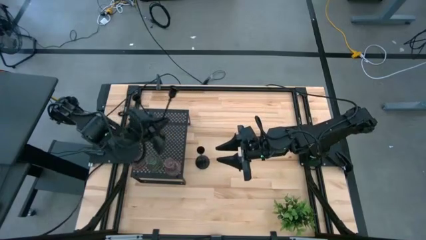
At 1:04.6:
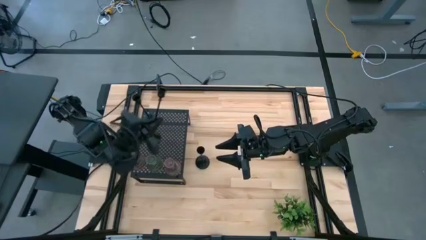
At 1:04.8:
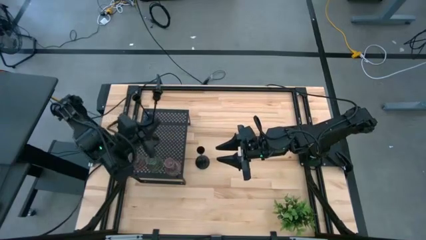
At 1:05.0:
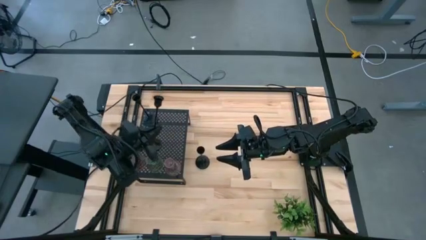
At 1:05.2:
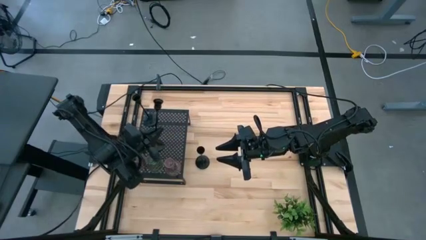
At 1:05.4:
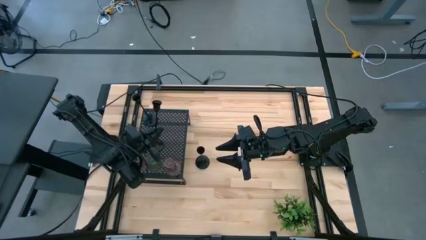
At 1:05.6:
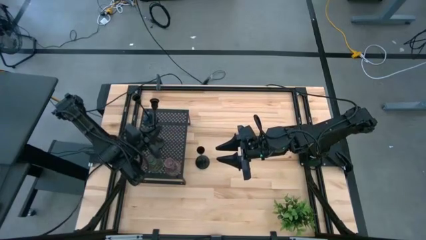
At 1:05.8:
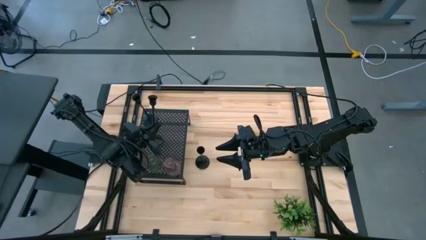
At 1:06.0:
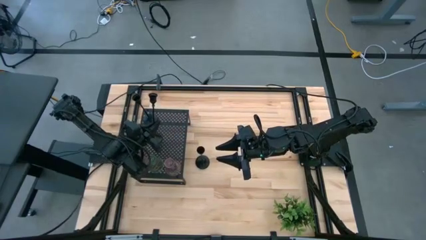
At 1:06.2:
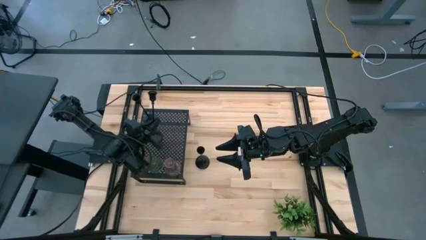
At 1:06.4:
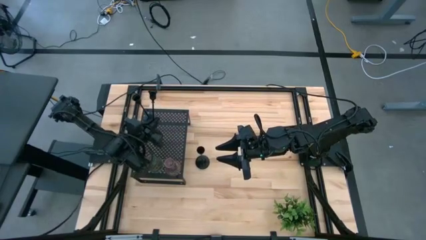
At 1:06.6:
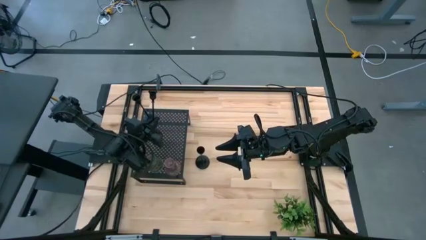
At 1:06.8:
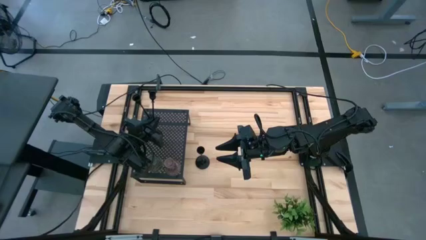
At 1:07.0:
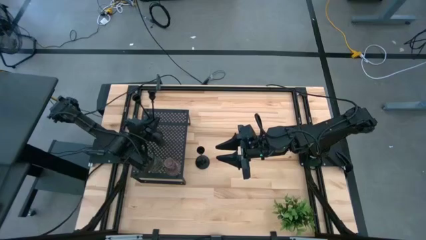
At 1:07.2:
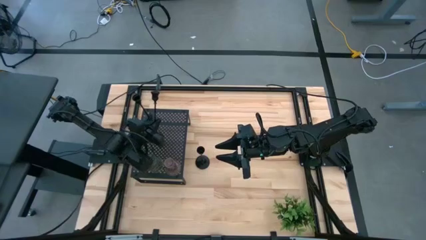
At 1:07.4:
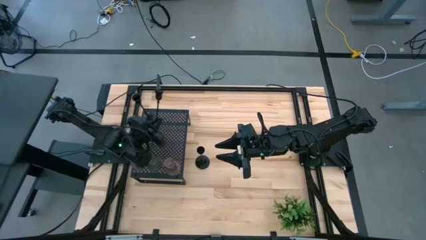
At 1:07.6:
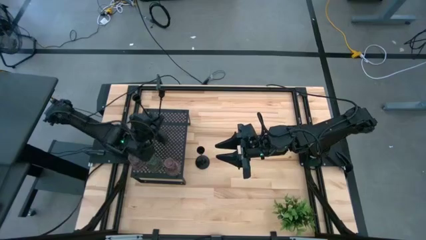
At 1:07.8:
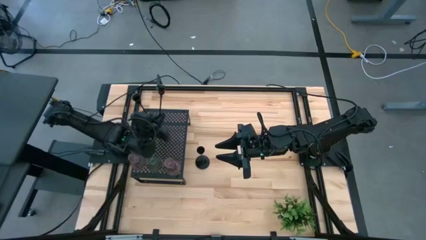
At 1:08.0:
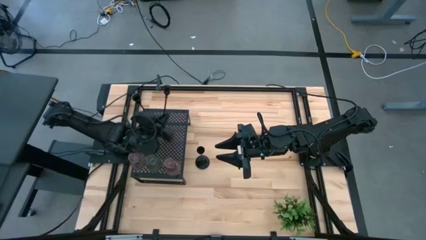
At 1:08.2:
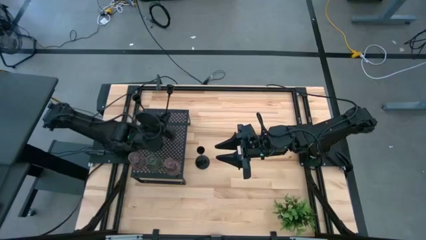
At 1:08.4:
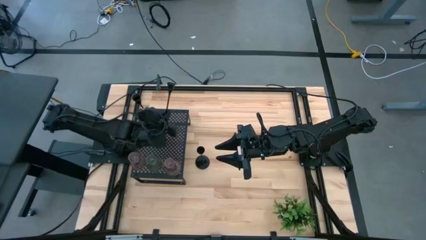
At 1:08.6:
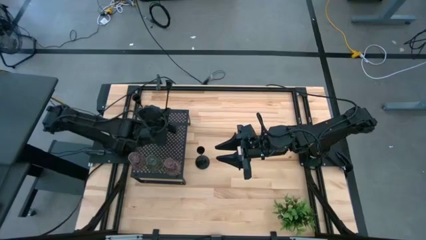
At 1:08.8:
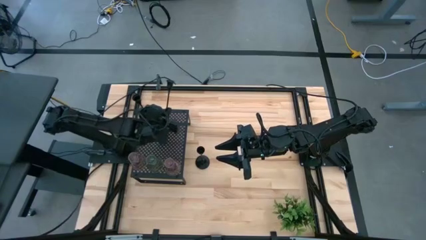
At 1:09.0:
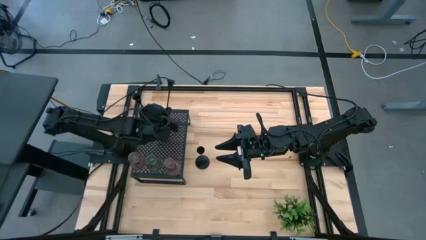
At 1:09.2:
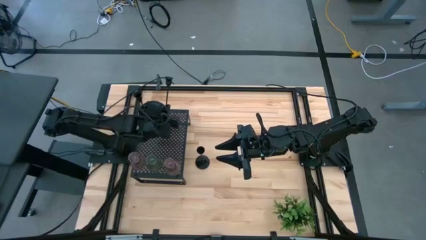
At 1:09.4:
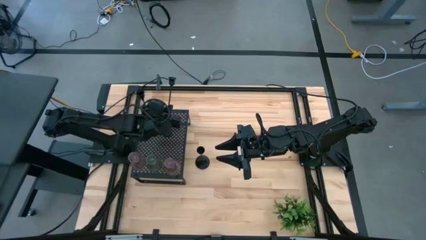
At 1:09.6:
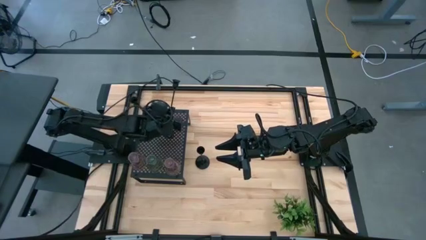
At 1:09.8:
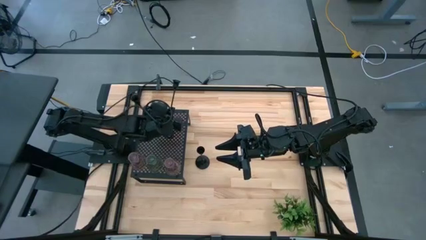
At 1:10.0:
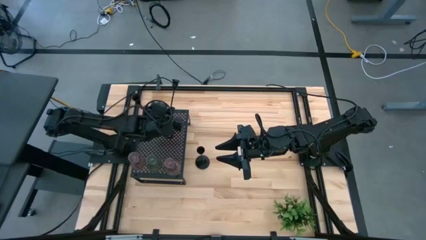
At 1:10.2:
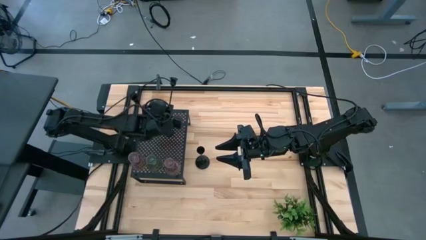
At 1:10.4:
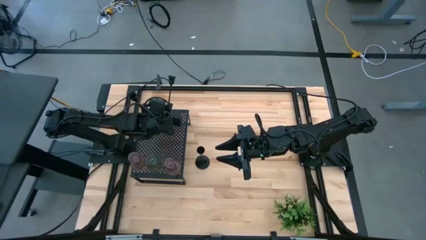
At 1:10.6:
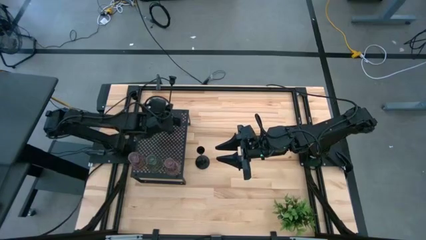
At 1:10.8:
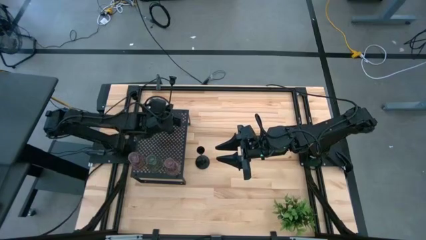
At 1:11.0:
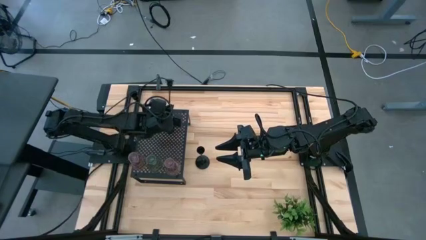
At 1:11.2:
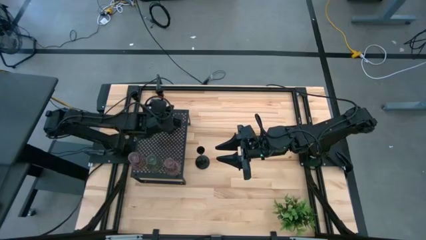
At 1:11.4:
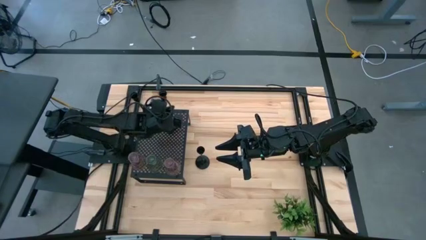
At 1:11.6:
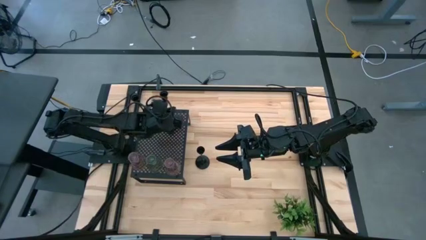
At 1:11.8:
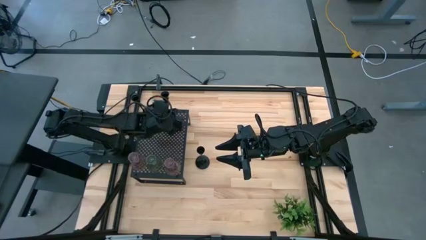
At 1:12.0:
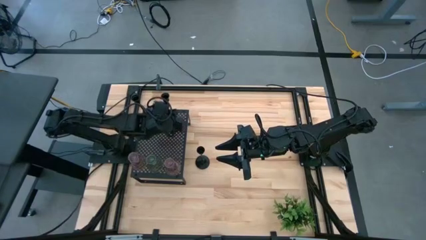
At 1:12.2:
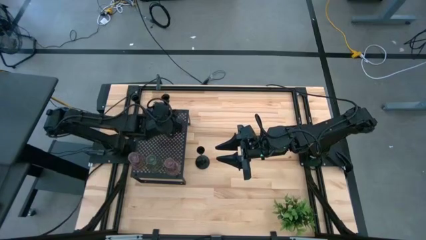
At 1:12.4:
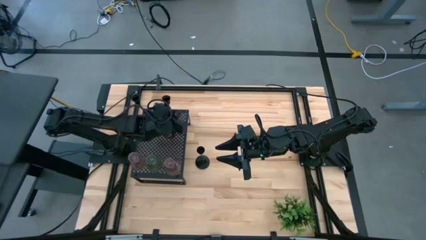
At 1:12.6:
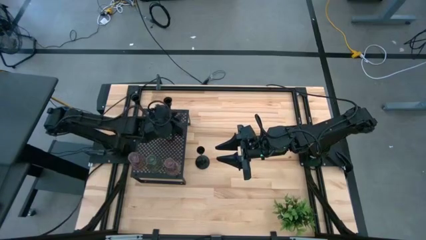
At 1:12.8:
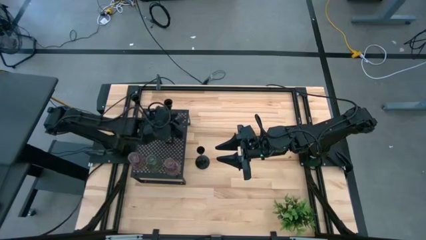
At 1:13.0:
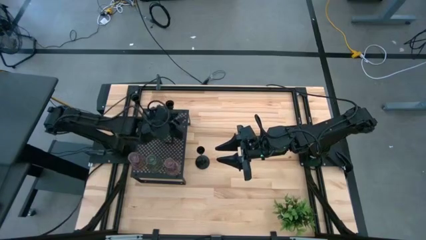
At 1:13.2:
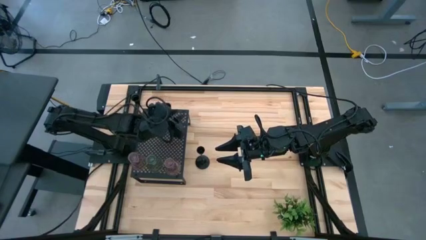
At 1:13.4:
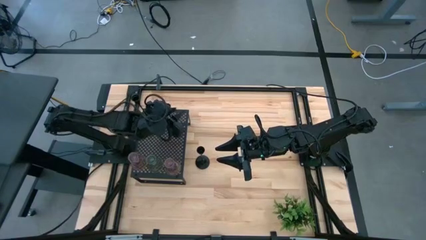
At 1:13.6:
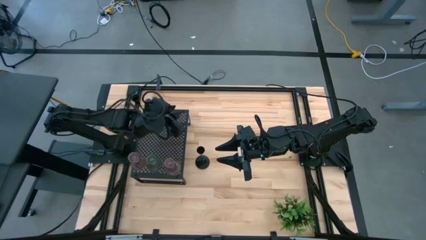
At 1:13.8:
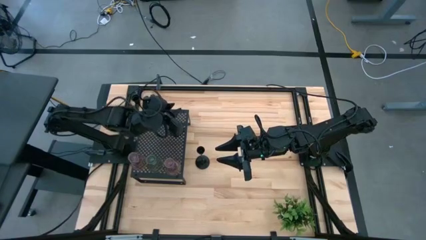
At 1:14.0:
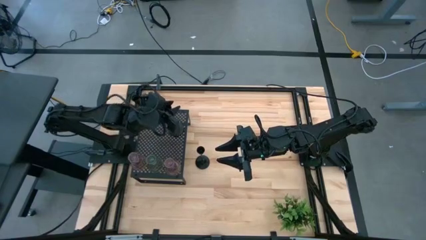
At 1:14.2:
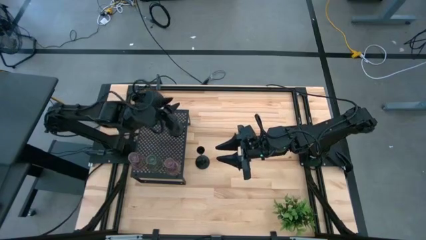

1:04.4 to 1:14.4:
Task: Pick & Place candle stick holders
Put the right black candle holder on the shelf
